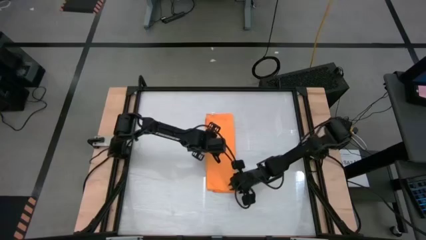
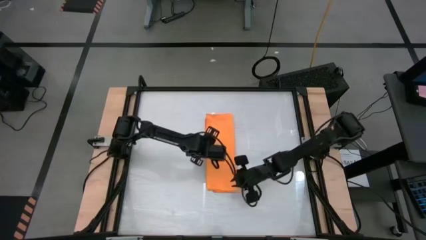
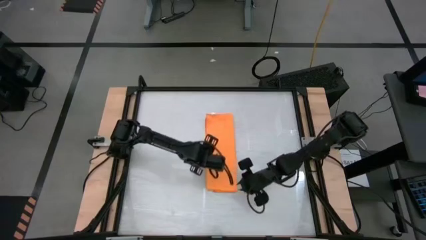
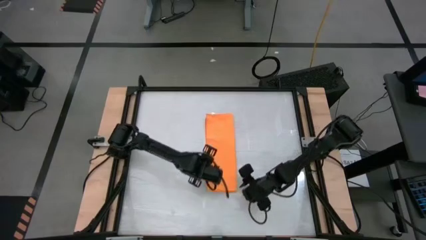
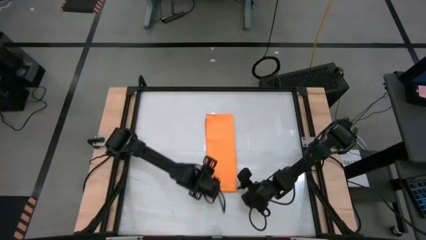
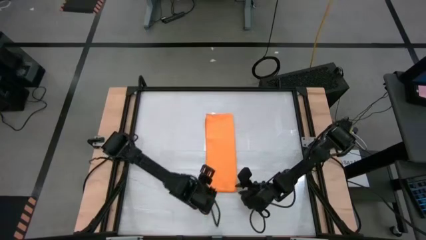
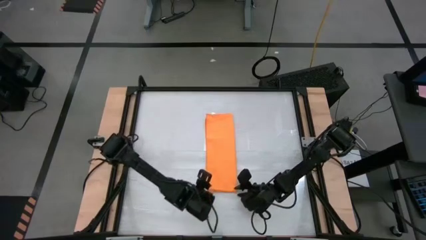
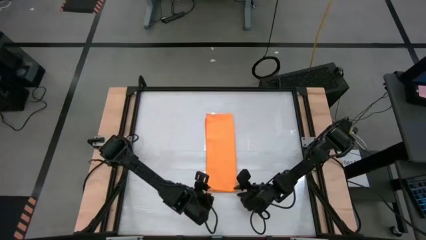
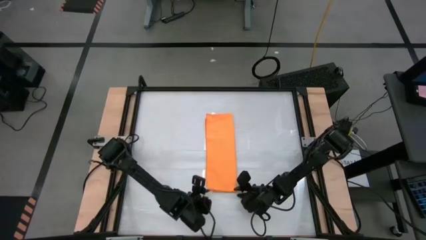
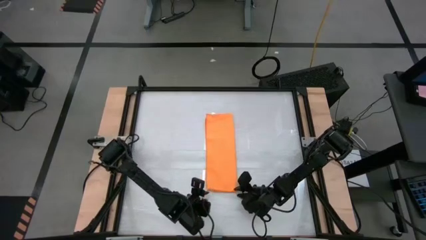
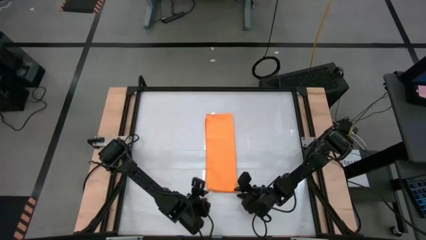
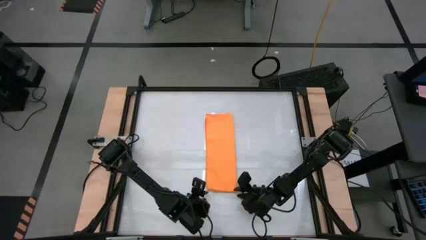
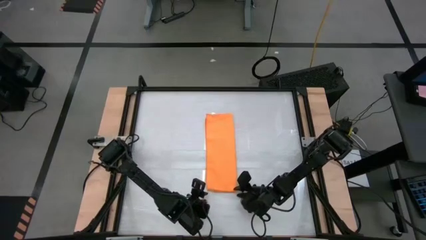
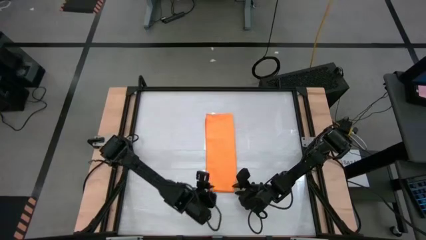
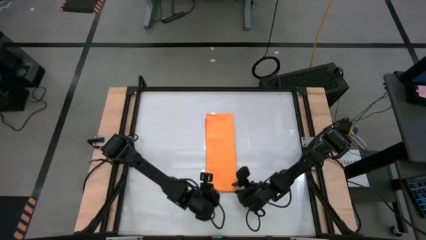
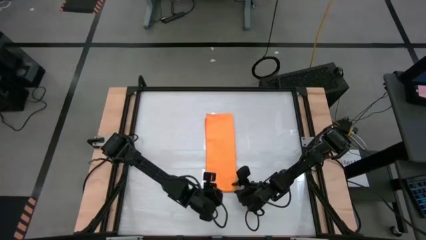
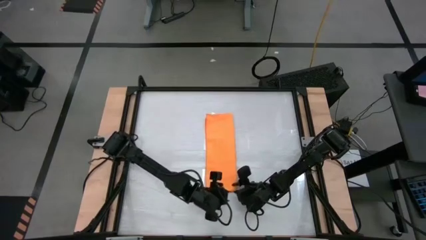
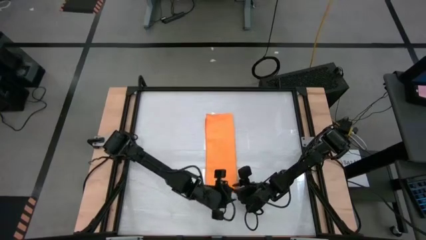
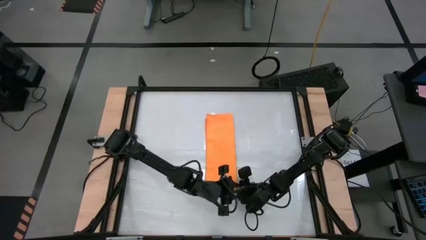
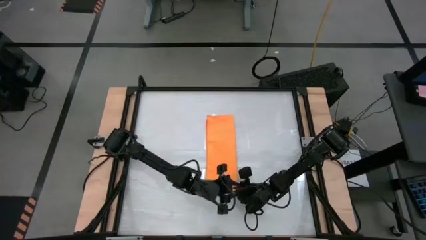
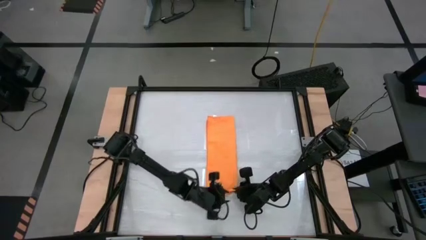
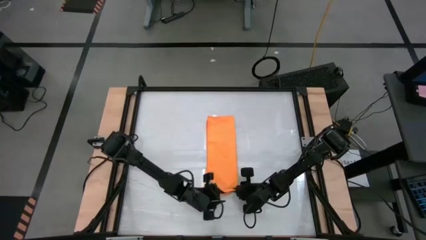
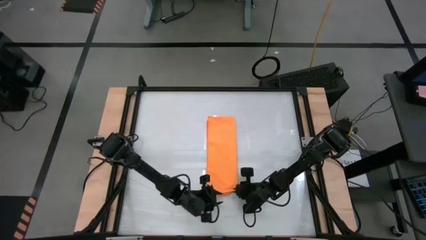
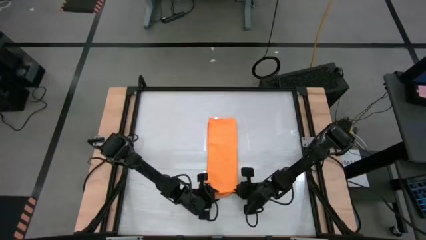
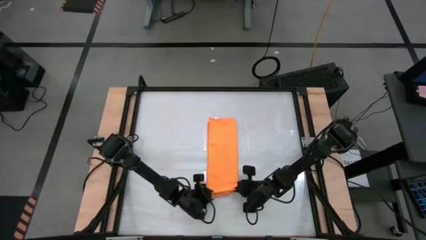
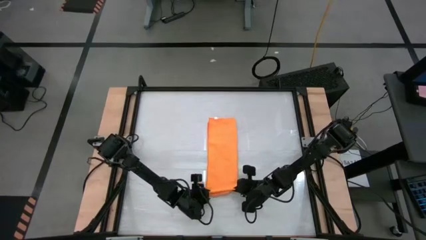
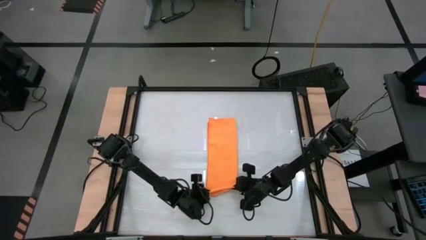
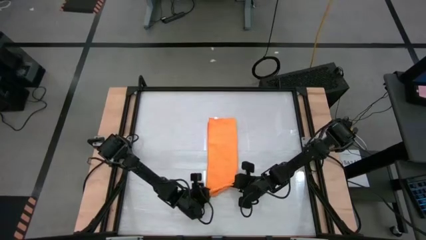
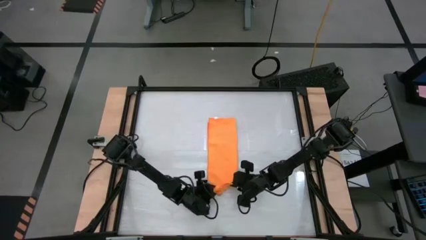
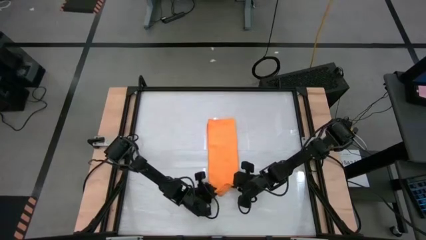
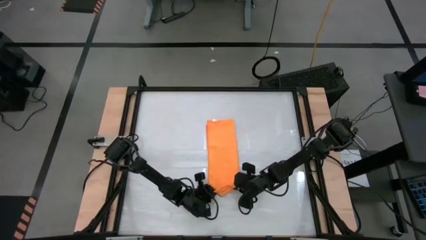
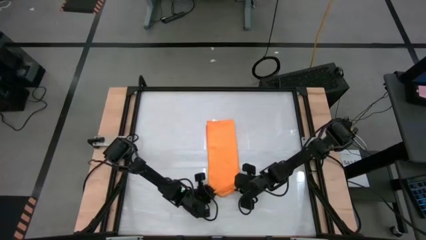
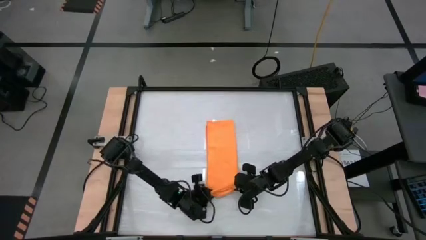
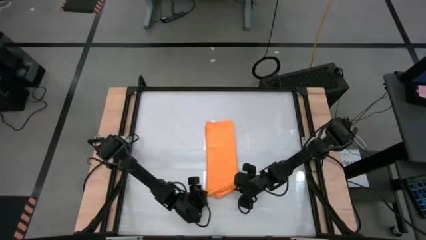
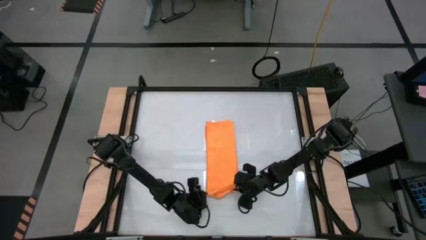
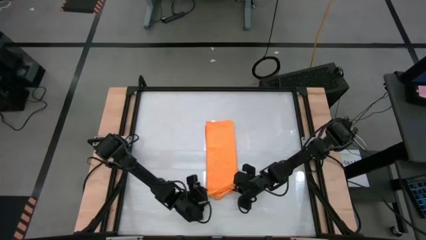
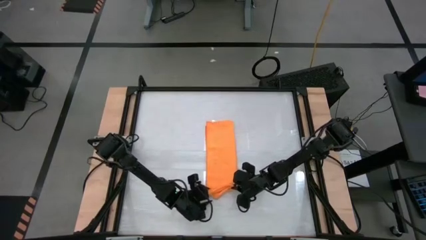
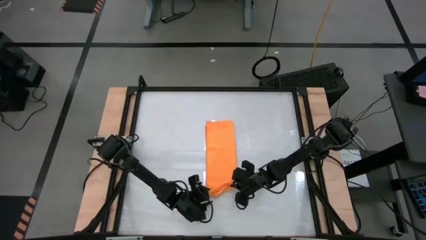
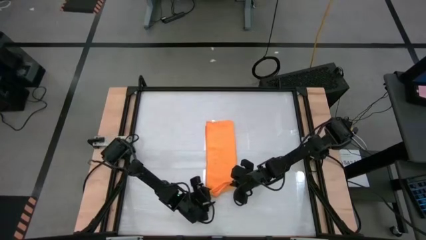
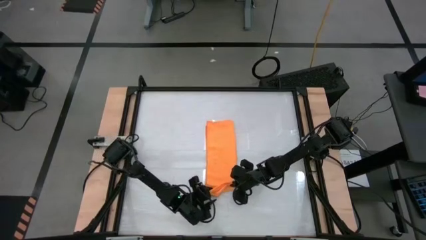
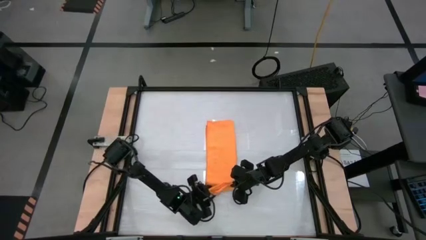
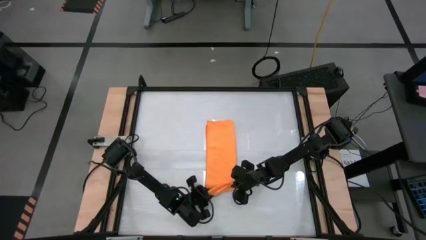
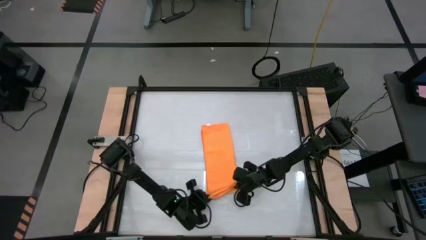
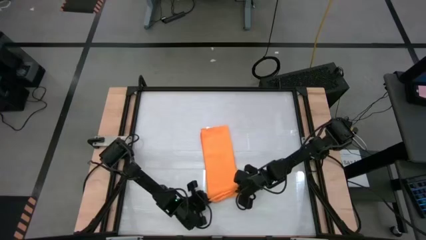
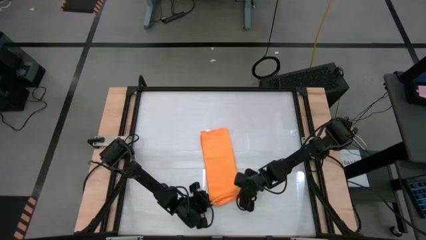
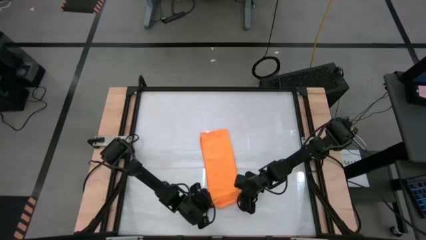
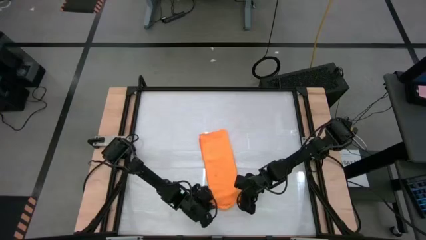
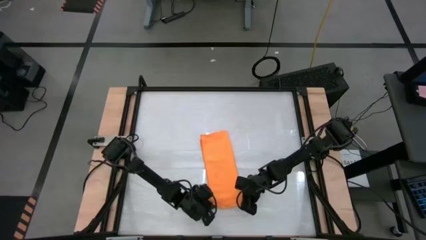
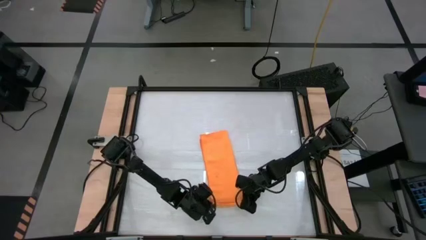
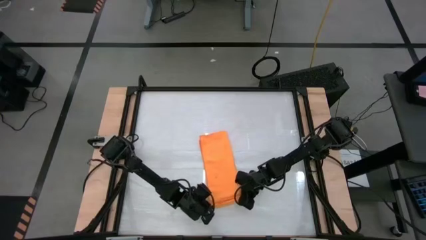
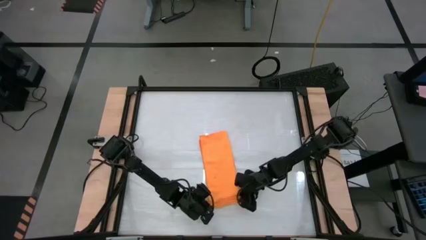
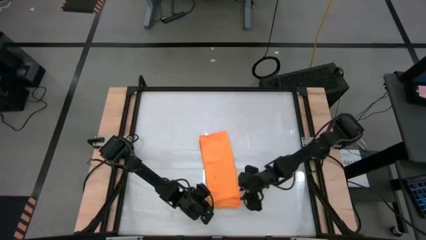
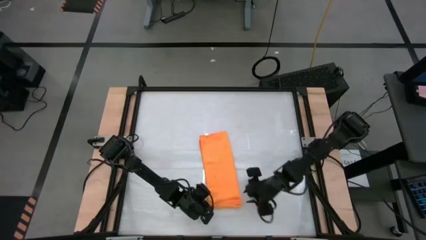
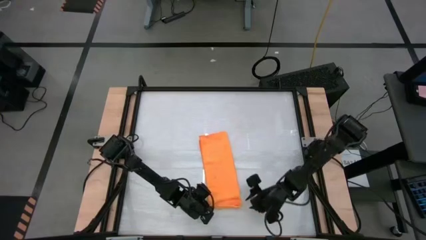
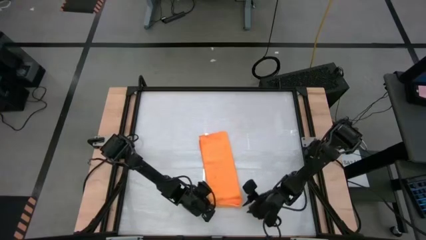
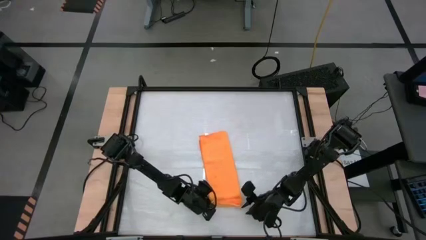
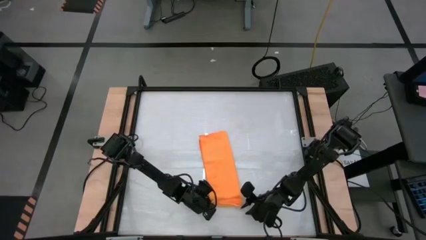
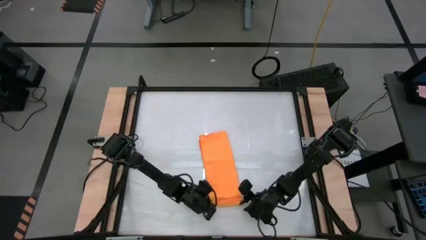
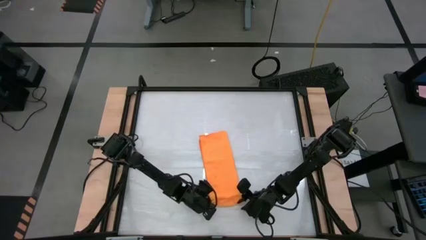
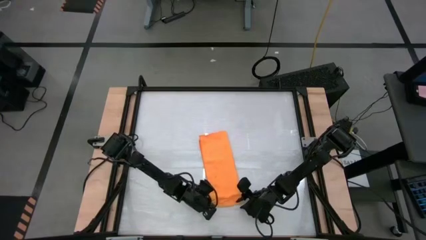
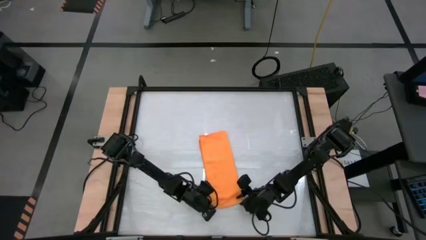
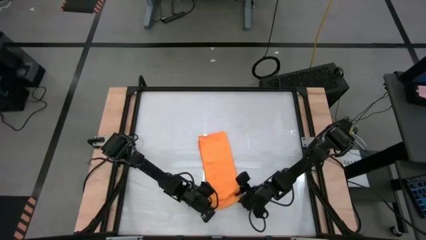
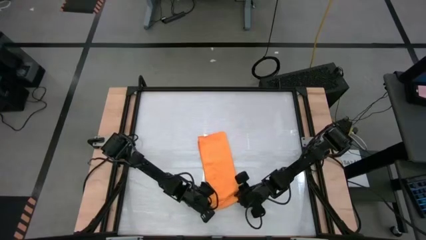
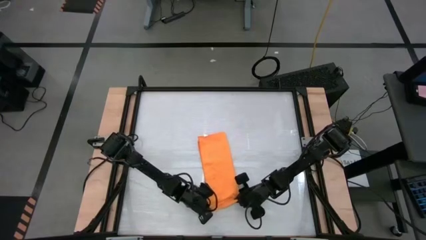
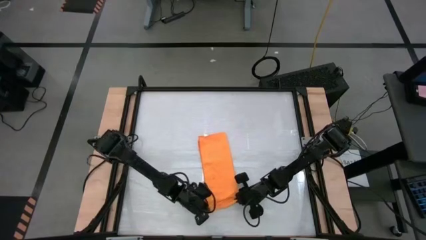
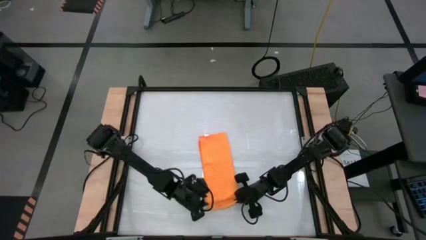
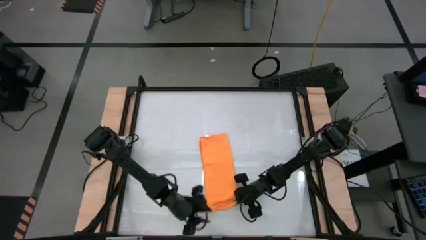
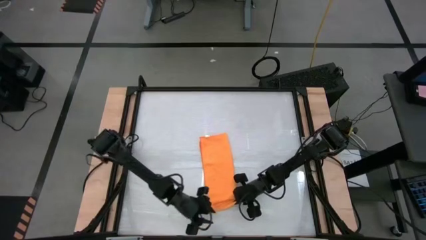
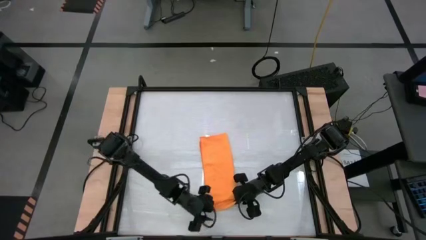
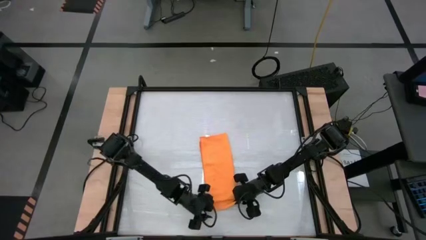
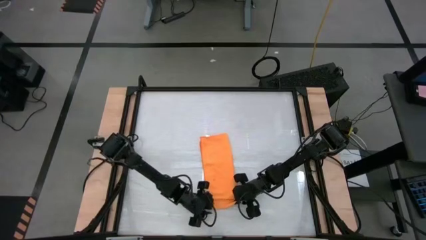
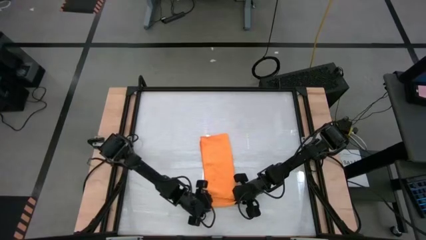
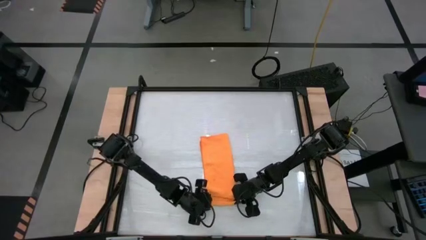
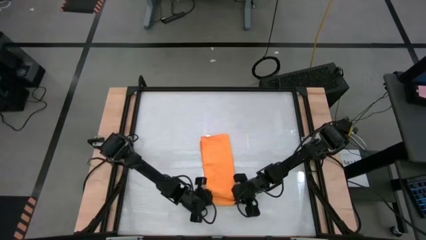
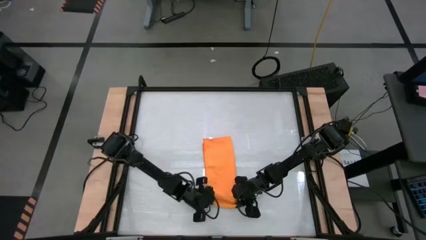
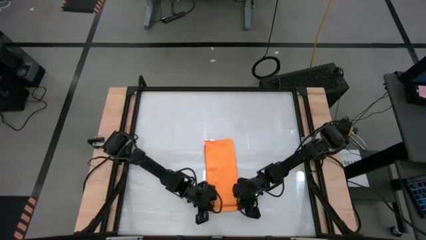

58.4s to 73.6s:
Task: Roll towel
Roll the orange towel
